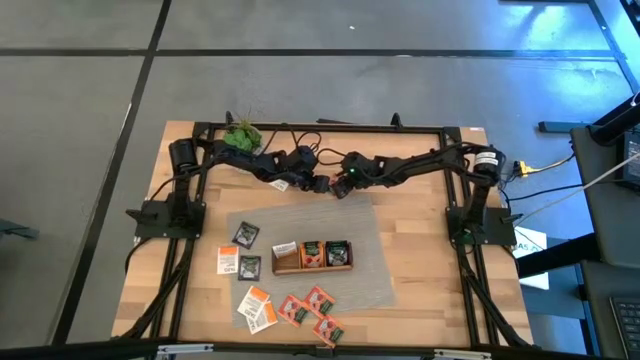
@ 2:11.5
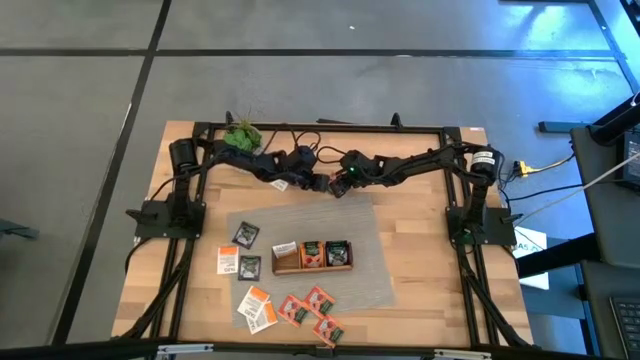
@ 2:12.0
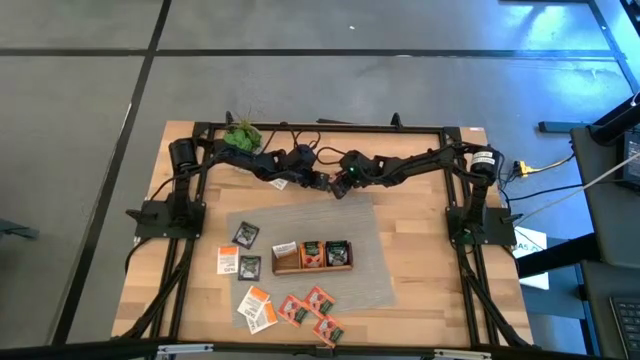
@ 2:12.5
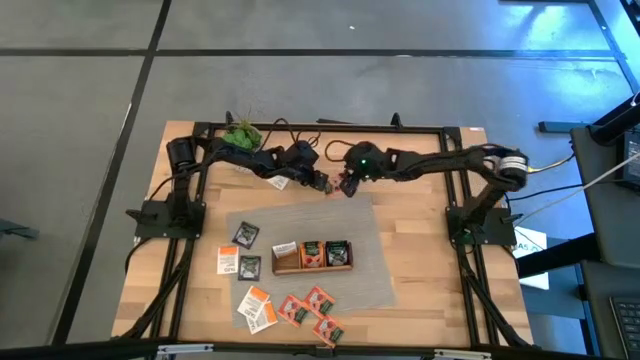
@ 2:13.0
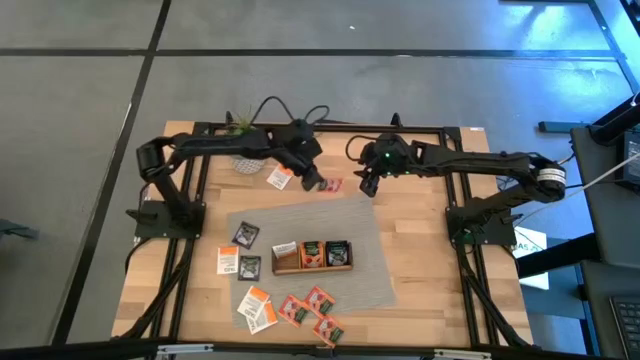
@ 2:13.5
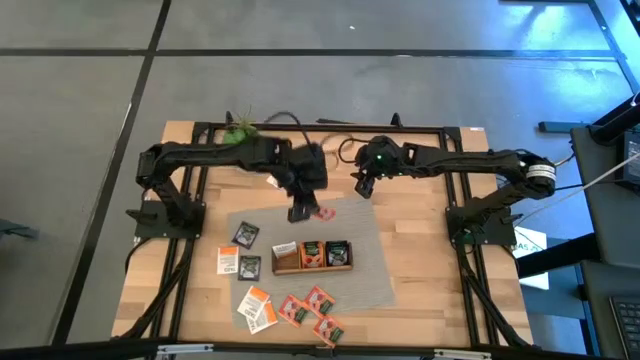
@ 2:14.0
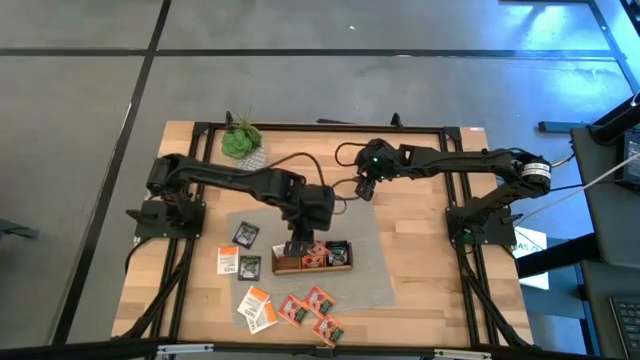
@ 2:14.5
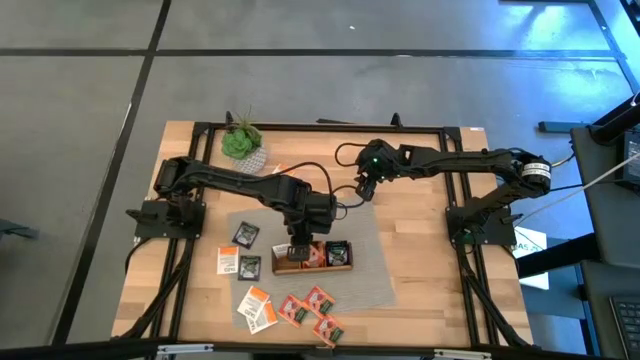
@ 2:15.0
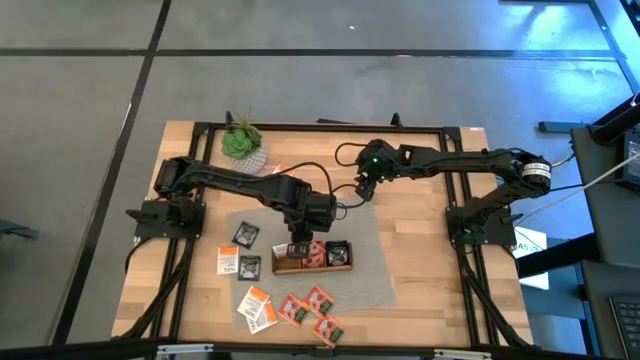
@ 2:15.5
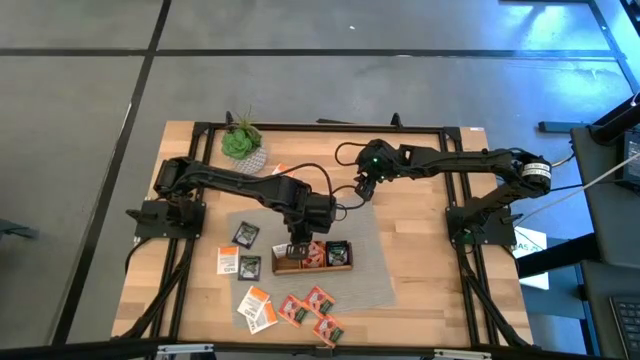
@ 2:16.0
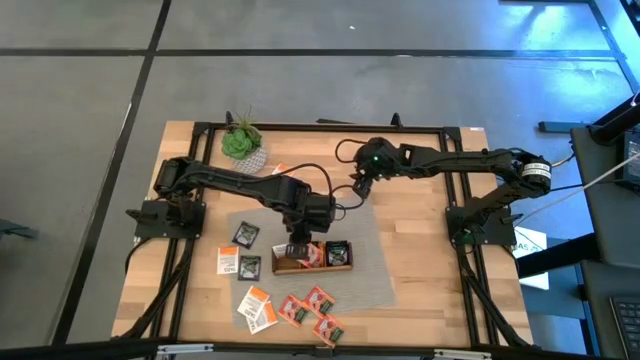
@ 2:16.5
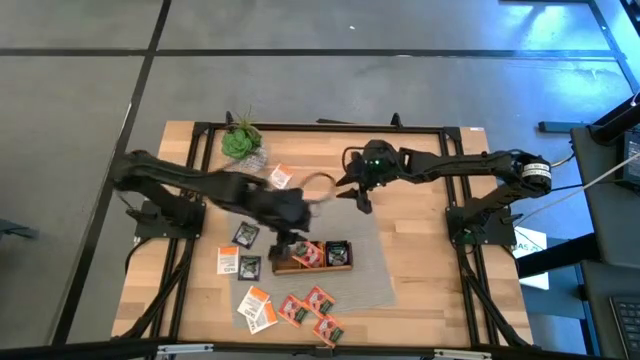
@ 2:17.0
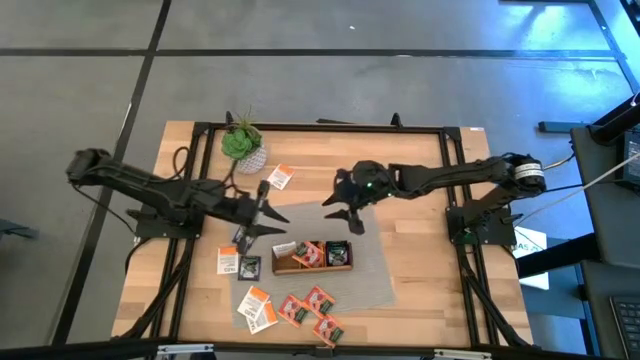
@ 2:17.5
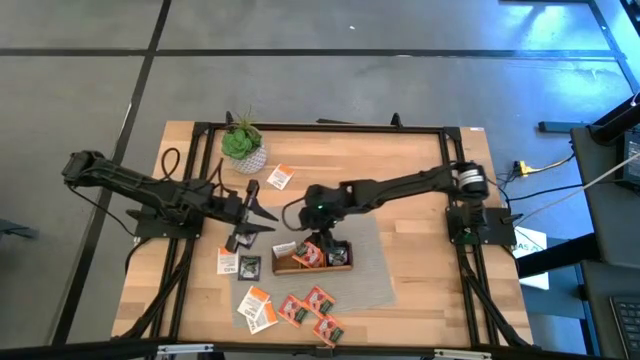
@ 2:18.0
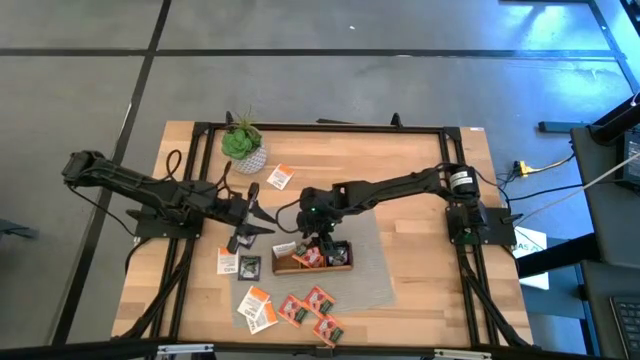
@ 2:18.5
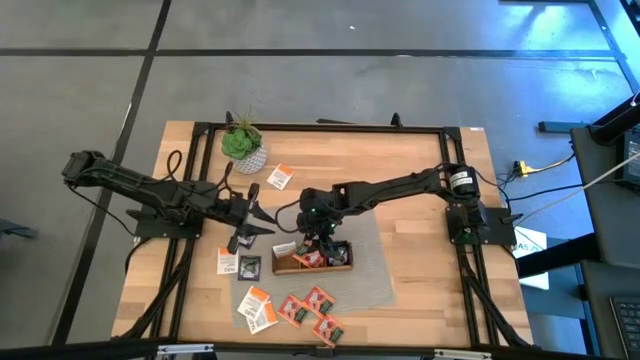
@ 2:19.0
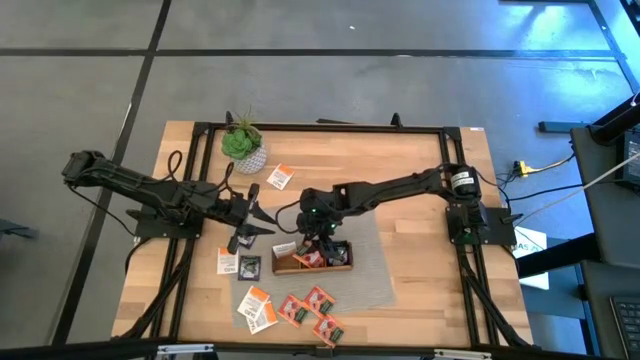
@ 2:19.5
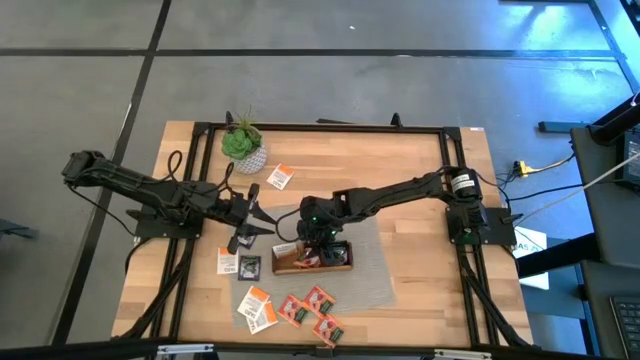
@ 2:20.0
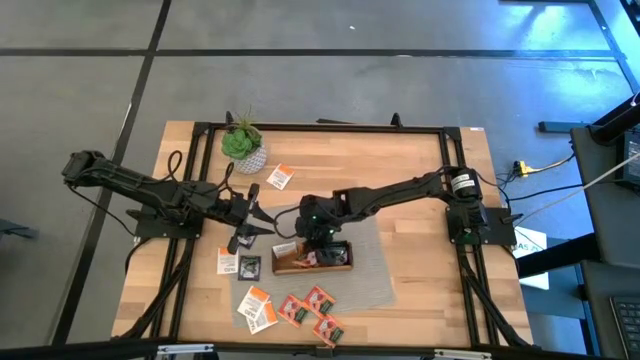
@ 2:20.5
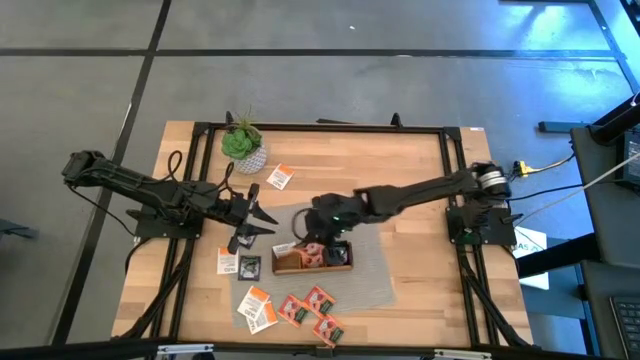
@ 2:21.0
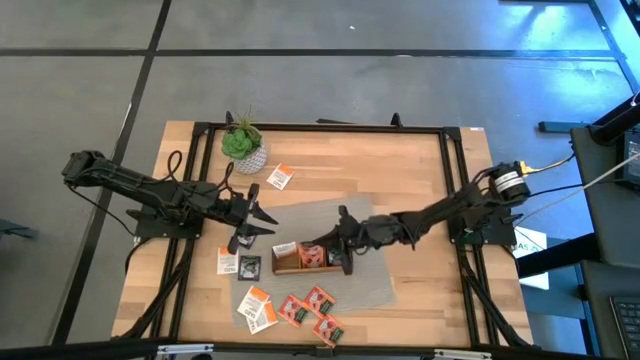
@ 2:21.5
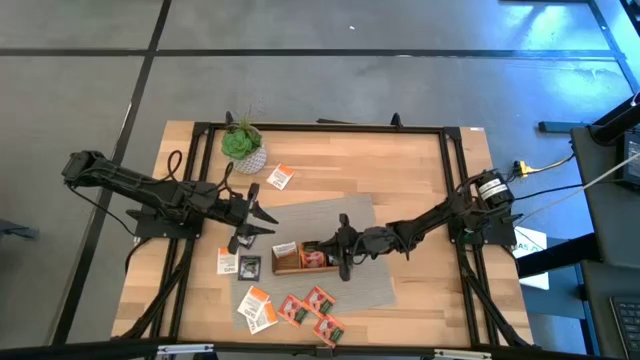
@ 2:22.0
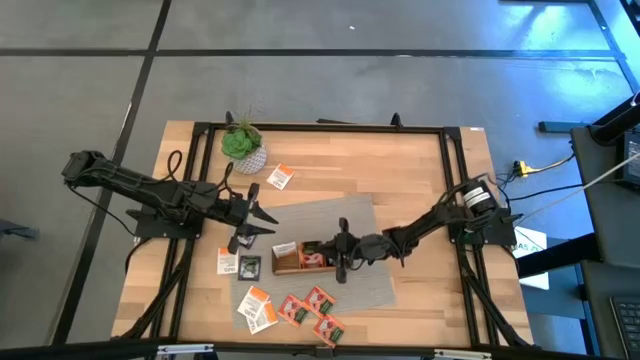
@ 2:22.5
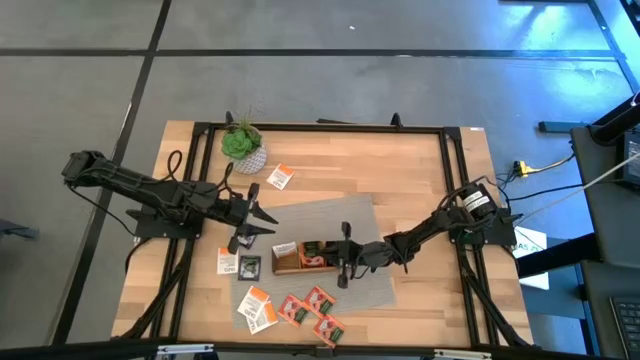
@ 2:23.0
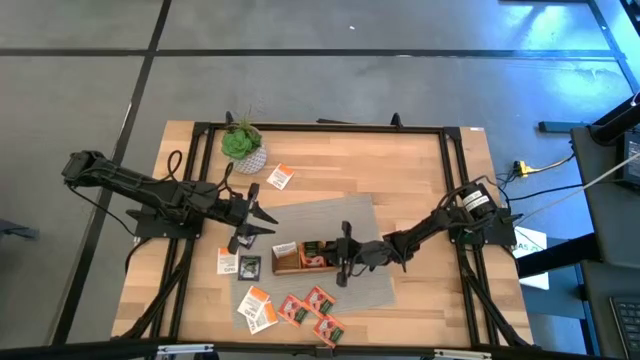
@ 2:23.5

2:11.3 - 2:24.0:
Task: Pick & Place Tea
Put the orange tea bag into the middle section of the wooden organizer

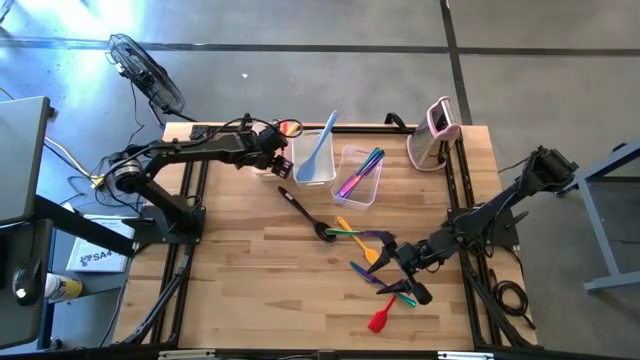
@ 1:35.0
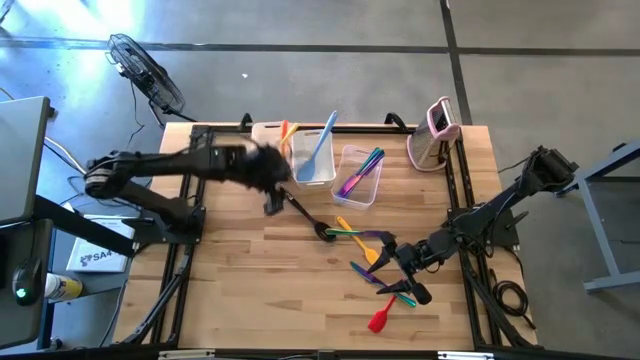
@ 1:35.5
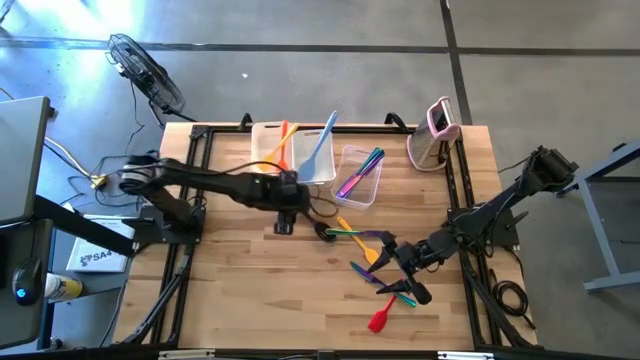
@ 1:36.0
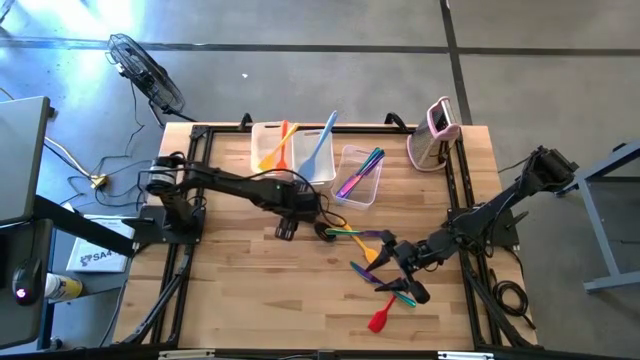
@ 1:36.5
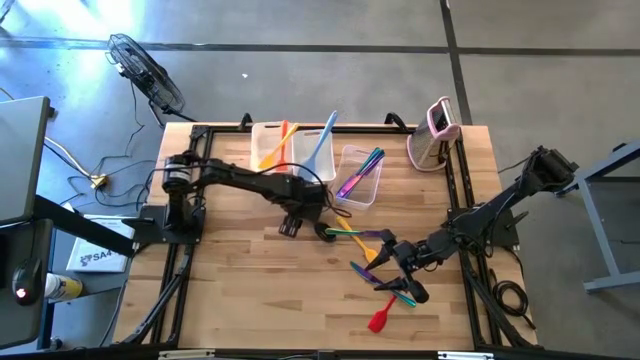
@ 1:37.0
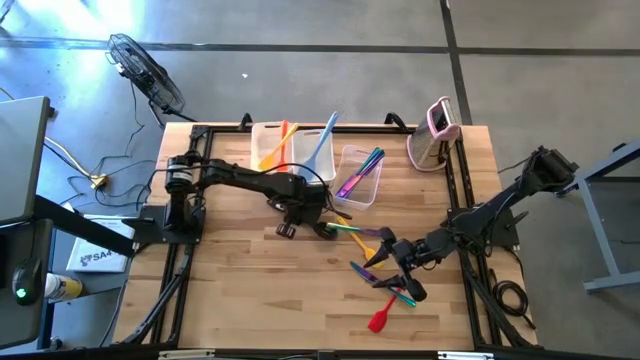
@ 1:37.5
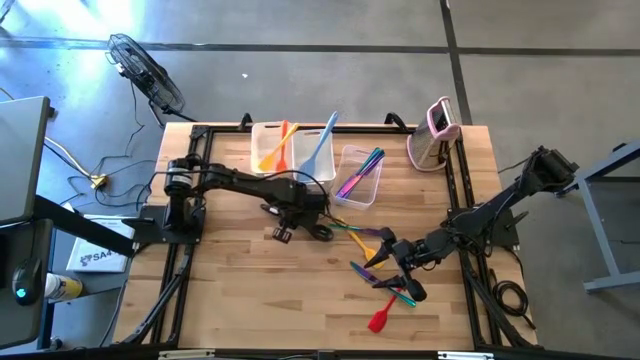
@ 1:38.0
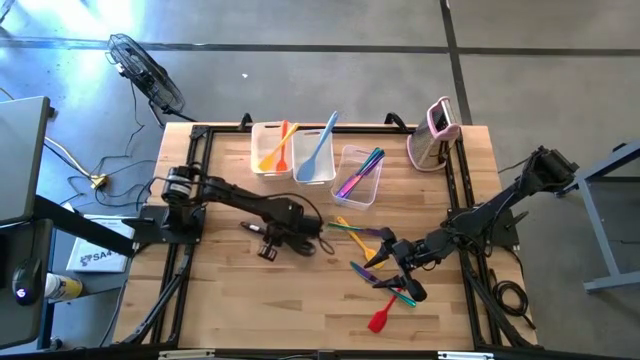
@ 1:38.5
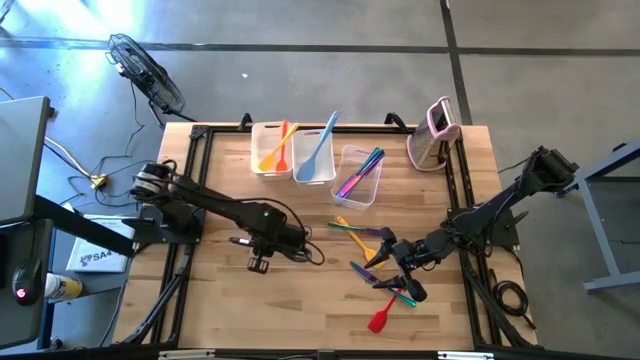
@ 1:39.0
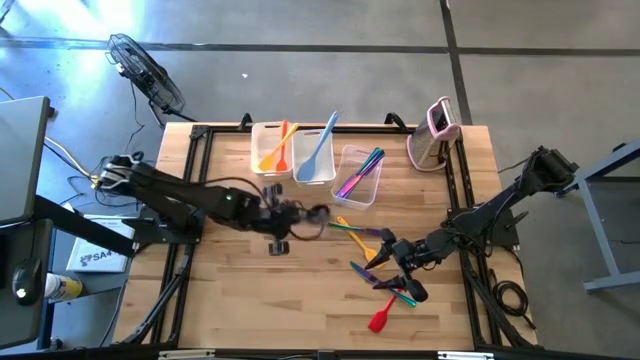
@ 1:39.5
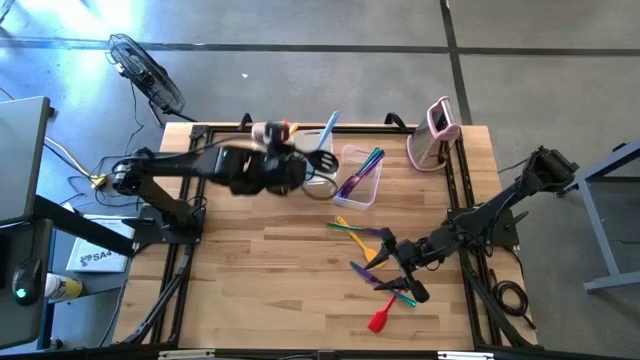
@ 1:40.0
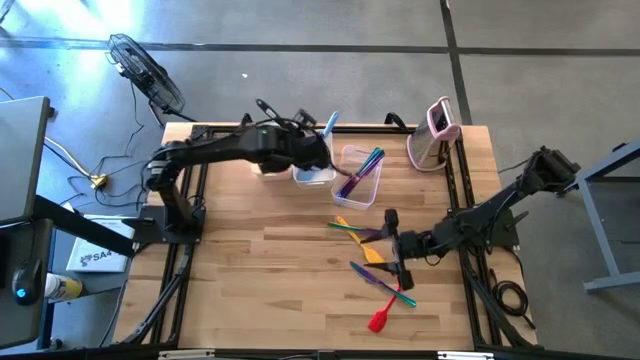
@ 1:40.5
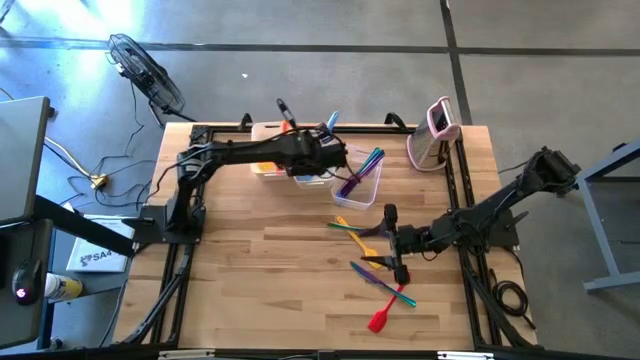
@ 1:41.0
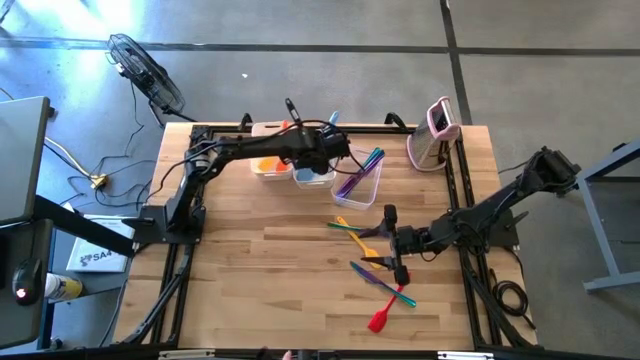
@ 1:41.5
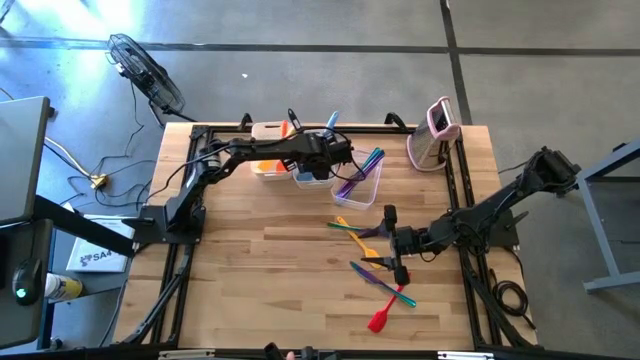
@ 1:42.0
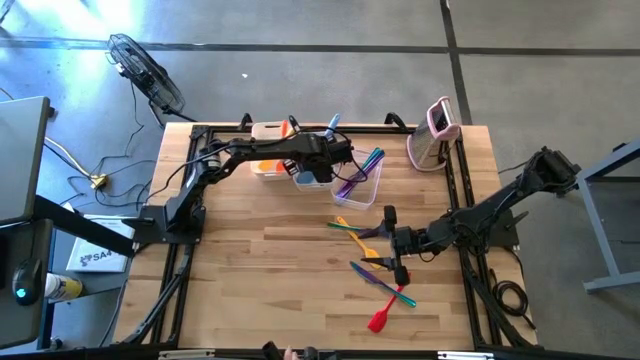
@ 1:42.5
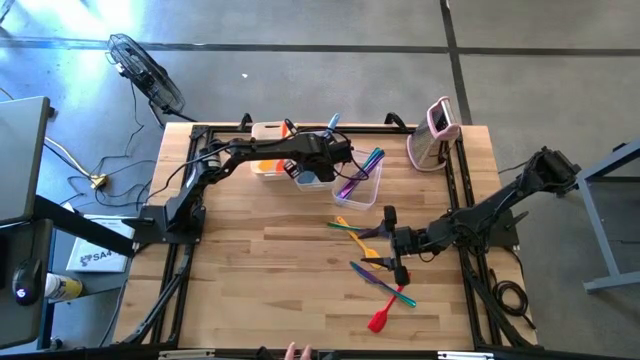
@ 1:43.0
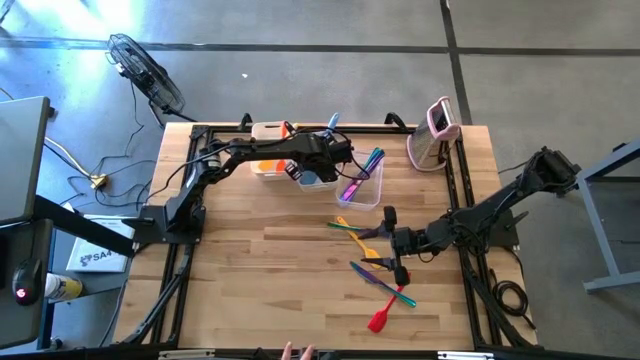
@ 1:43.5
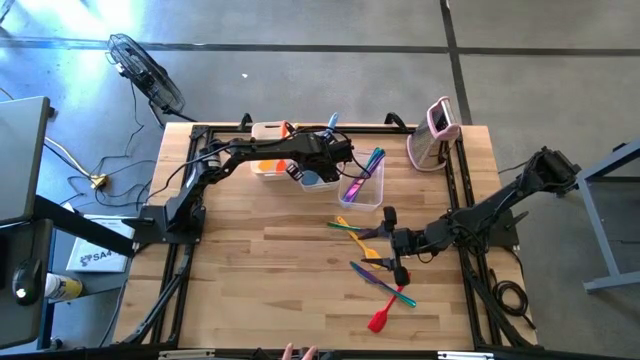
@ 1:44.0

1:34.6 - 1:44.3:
Task: Pick & Place Kitchen Items
Put the black serving spoon into the right white bin
